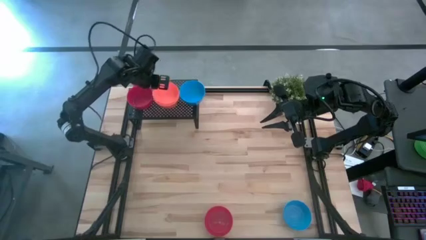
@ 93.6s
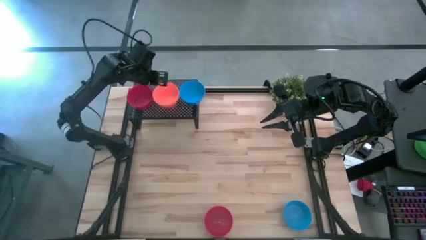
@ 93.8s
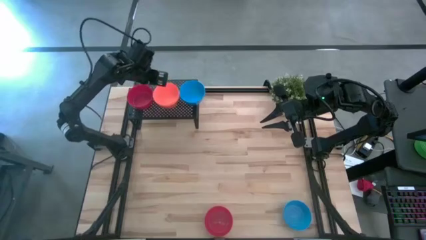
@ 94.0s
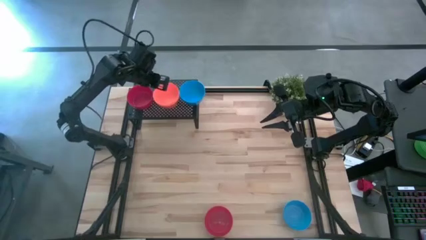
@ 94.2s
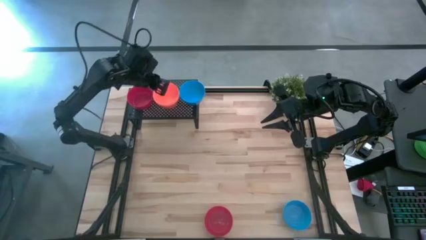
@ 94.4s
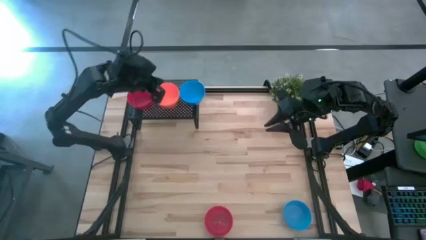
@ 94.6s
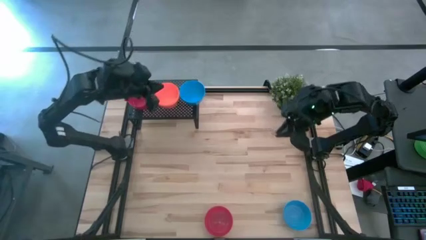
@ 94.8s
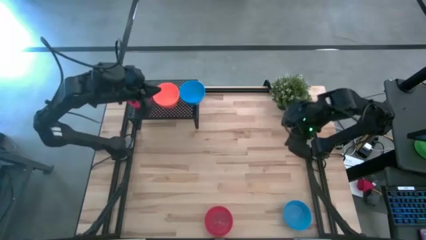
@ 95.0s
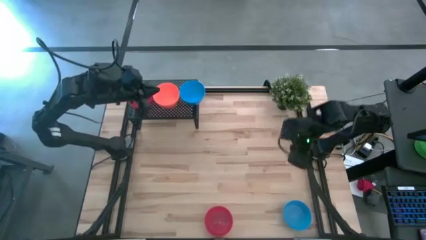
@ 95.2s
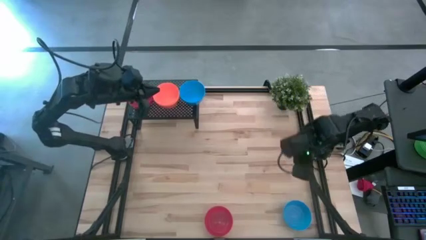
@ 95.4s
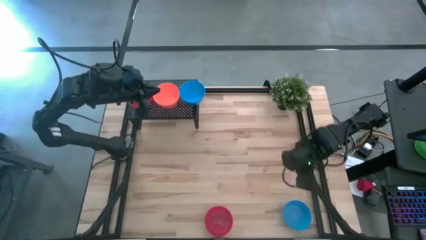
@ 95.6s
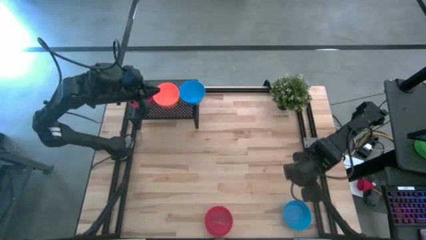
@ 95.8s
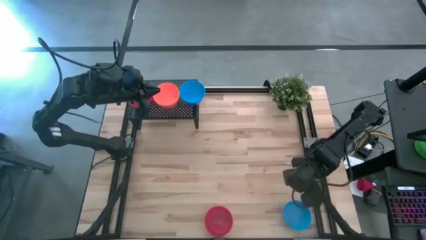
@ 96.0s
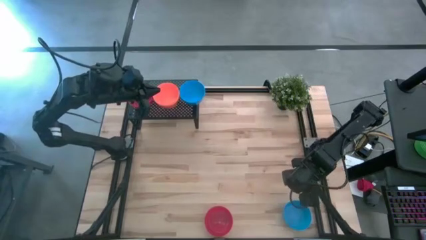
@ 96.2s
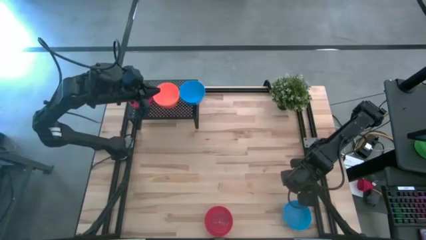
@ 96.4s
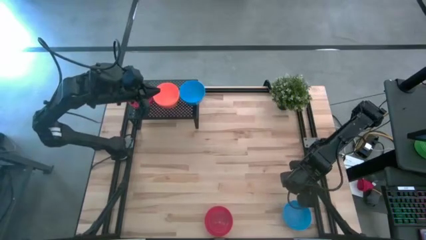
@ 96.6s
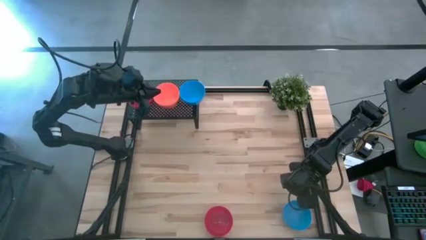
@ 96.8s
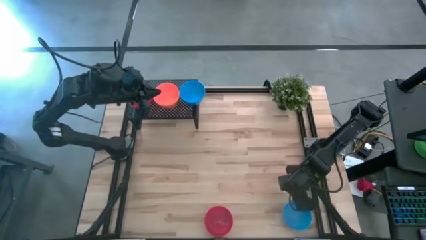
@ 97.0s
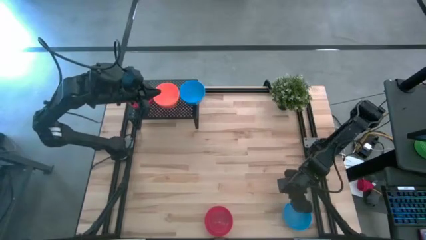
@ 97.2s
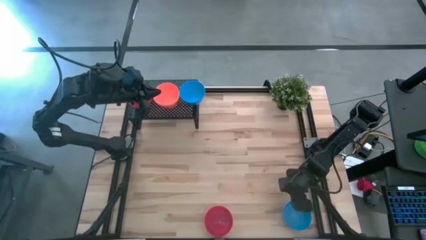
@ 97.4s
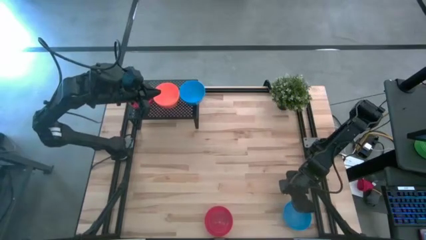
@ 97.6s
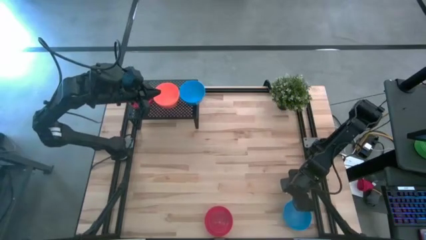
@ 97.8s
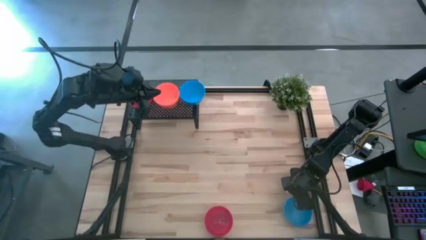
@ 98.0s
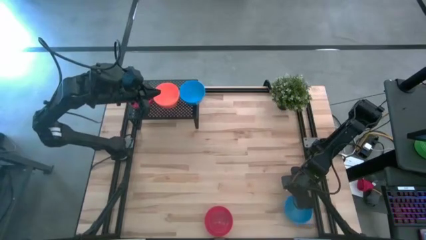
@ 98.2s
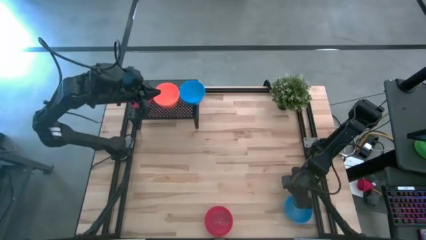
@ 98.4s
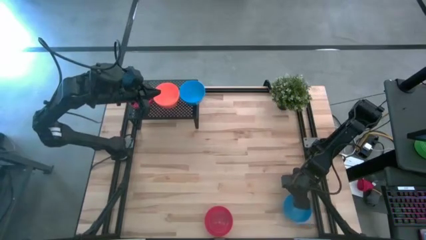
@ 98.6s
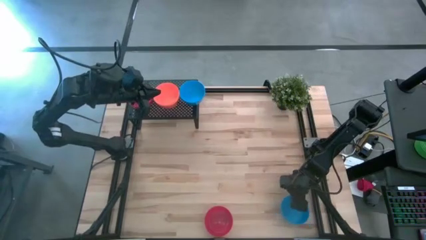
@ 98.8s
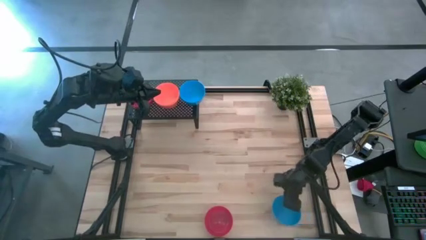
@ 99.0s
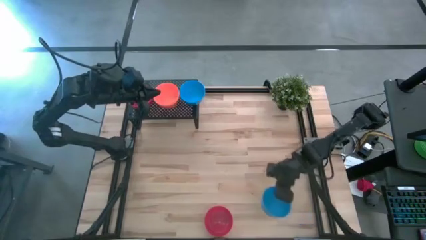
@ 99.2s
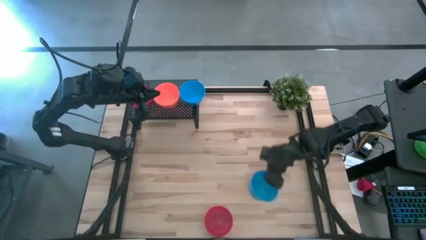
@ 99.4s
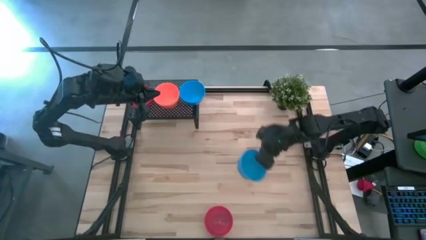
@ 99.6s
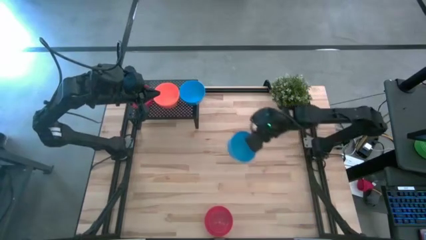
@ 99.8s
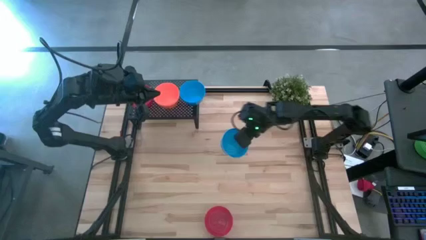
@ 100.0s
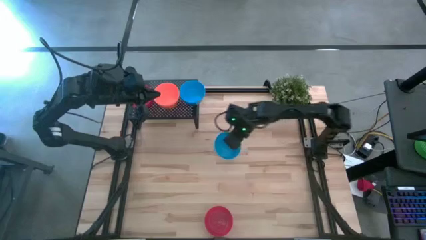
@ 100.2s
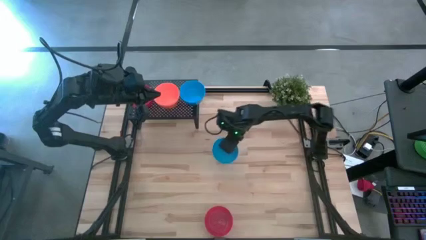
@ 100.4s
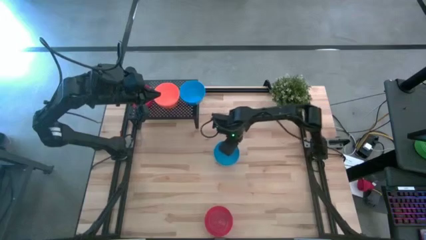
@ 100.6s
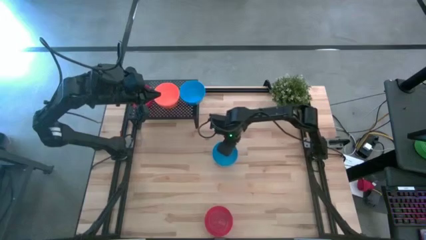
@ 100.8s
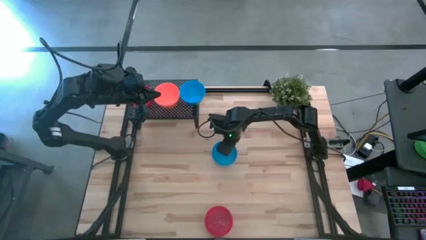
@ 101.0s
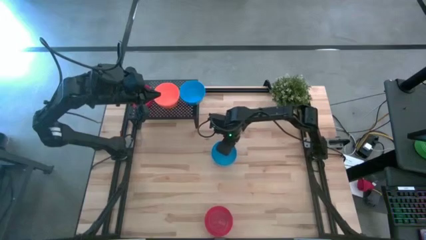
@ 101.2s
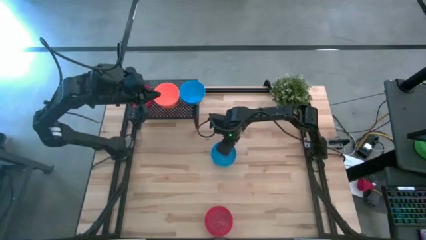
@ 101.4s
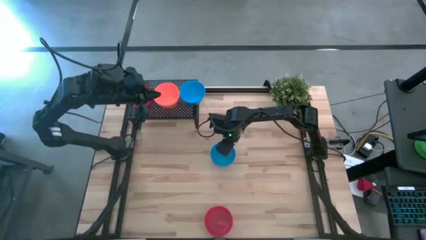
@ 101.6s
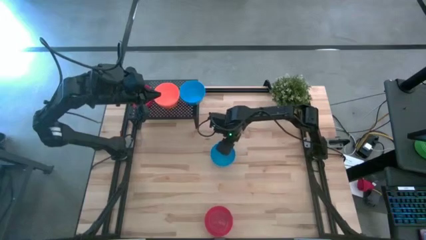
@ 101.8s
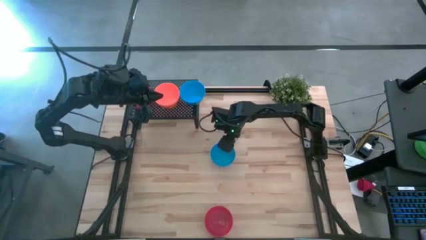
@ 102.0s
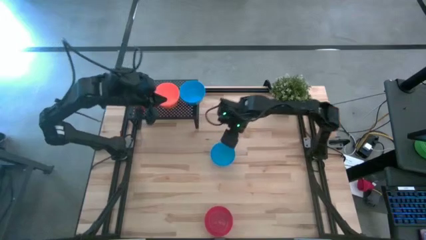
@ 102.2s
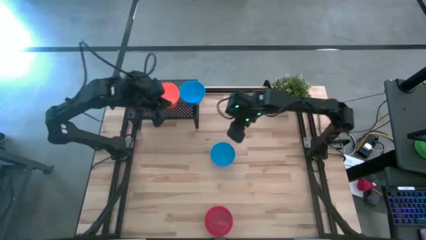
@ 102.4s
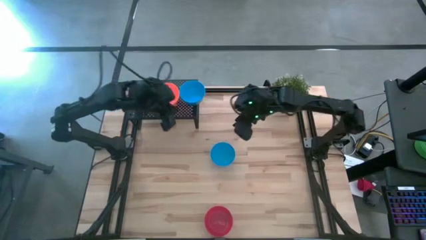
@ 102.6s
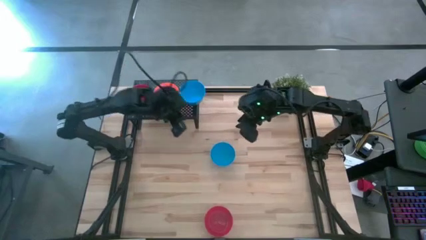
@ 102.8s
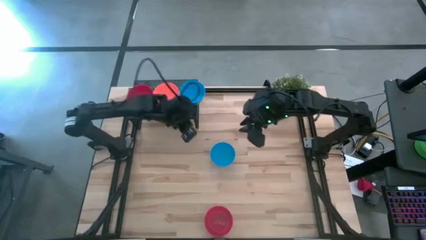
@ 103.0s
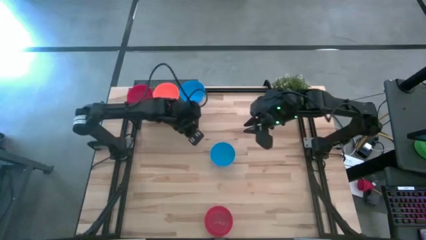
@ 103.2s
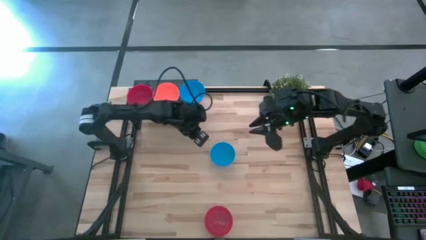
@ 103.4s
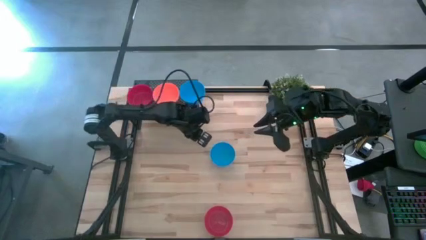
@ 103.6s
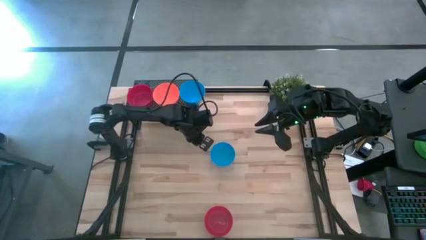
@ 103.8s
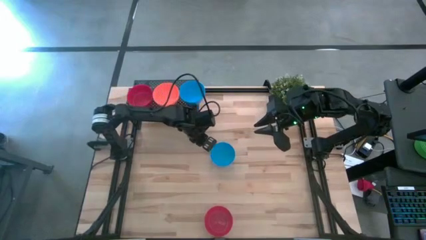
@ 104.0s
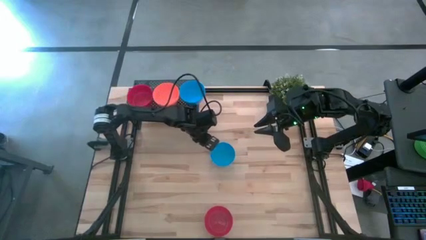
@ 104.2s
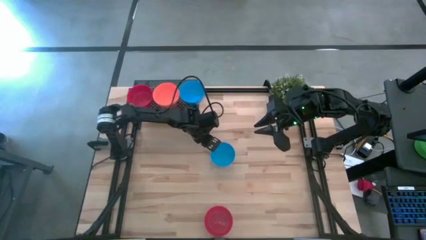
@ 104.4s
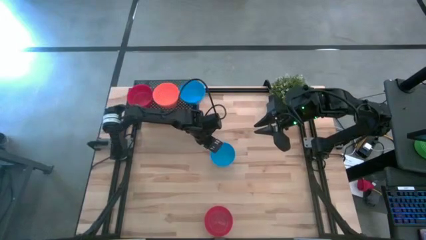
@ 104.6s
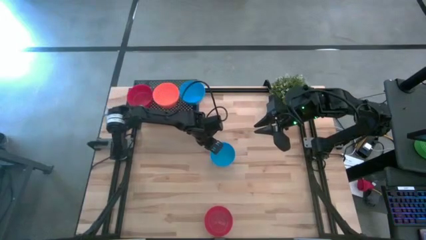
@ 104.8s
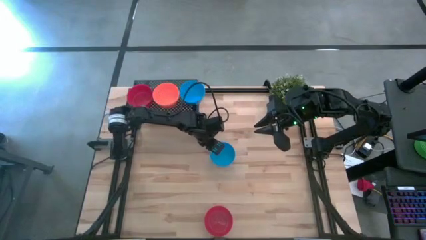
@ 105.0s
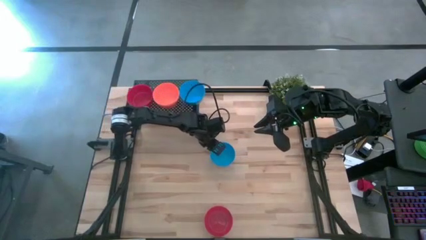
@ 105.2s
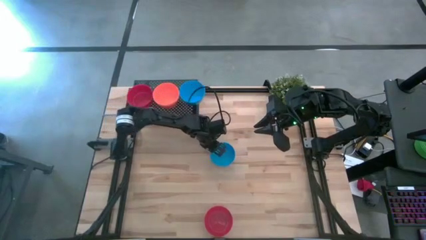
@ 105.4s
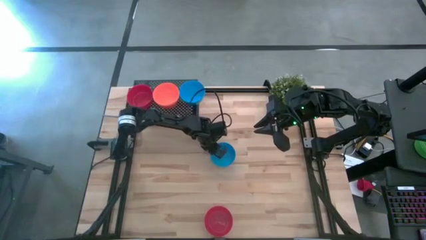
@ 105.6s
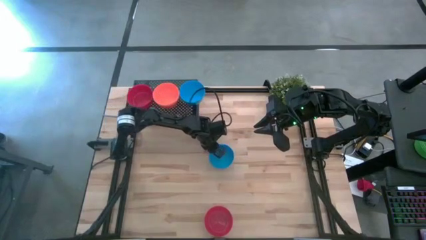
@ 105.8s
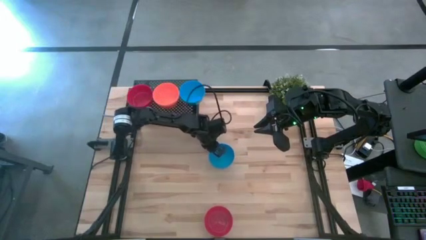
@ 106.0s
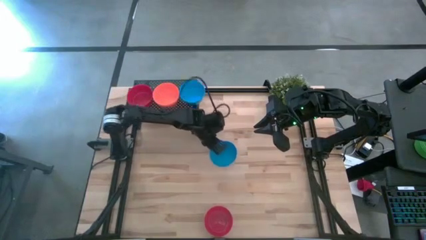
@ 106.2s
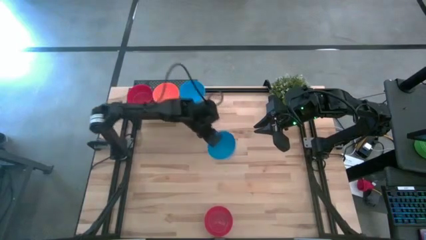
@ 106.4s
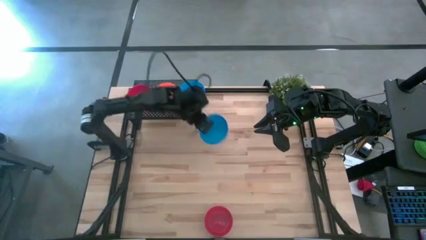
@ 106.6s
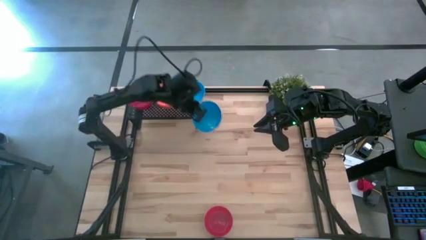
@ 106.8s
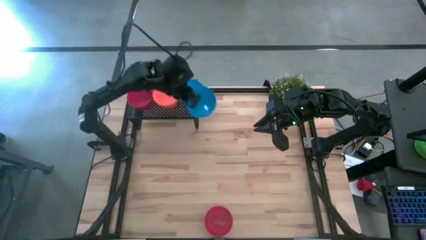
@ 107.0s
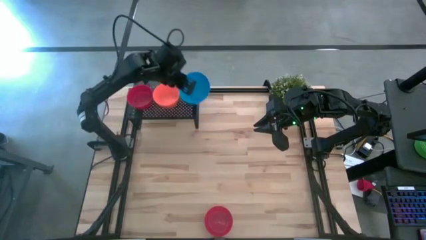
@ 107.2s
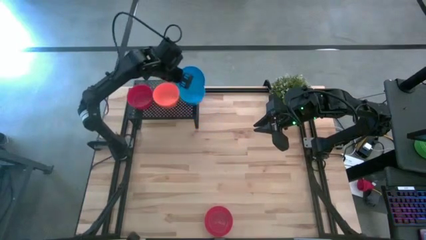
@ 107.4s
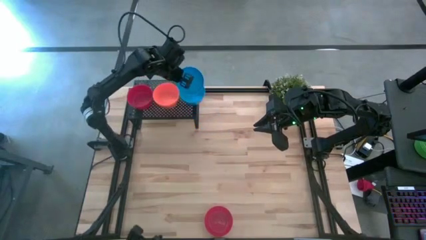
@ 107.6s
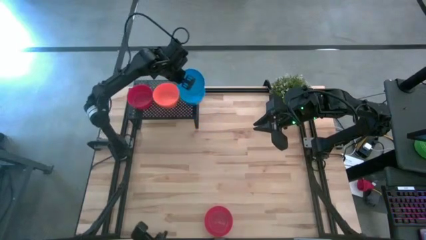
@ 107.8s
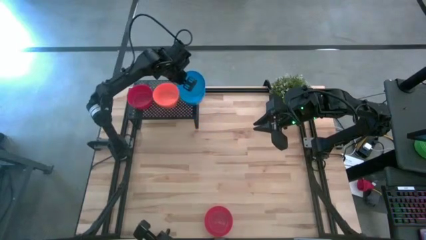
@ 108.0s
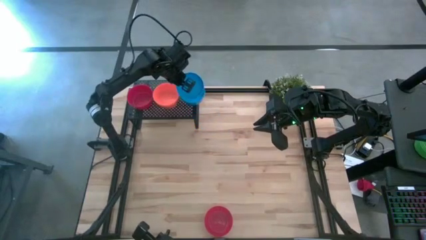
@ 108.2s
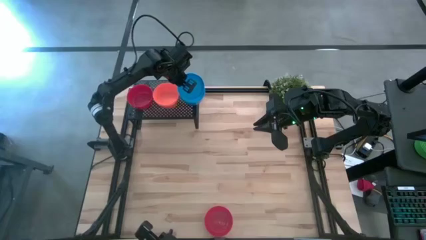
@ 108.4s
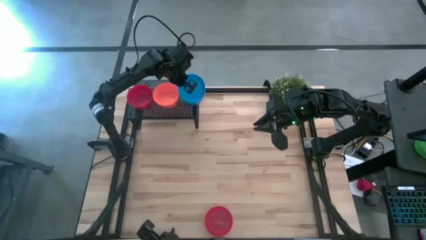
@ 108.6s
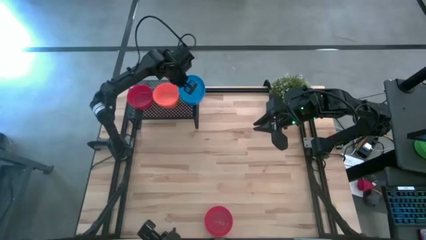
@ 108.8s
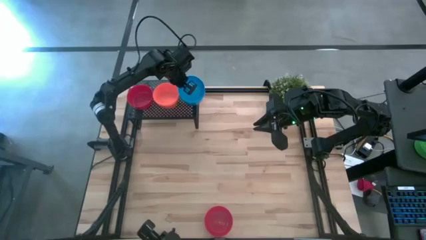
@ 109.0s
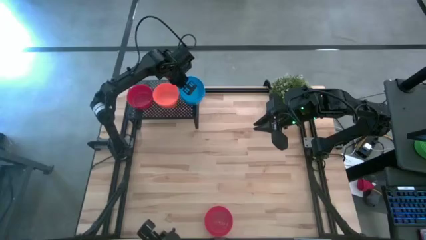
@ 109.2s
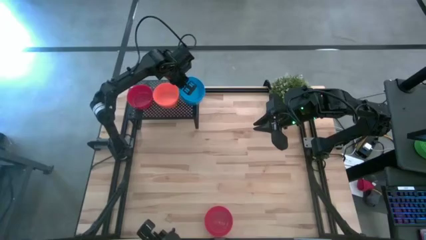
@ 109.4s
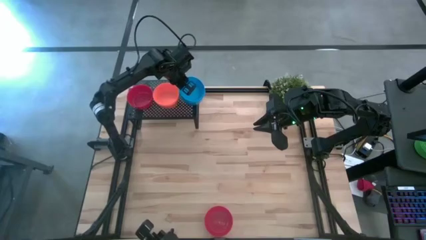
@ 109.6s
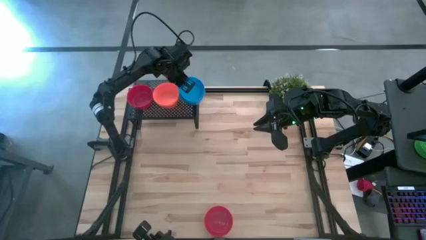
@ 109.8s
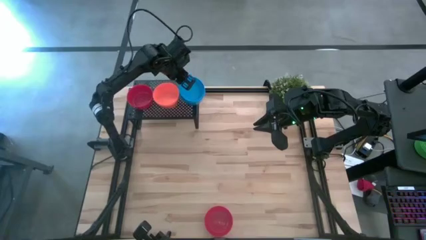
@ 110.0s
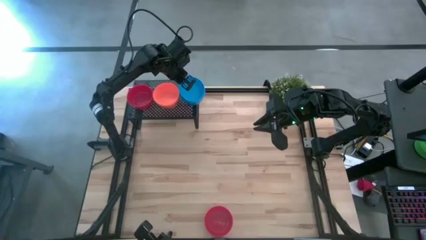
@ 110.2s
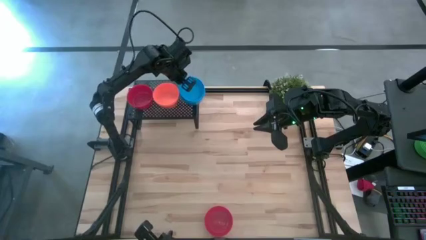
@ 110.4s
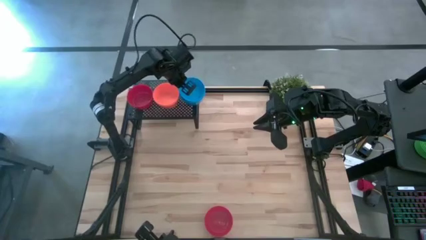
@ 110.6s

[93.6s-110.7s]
Task: Pick & Place Mini bowls
Stack the blue bowl on top of the blue bowls on the shelf
